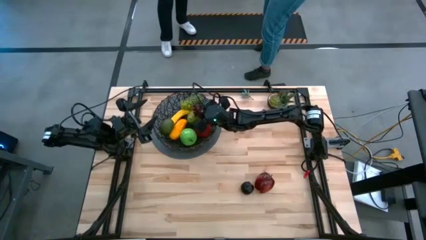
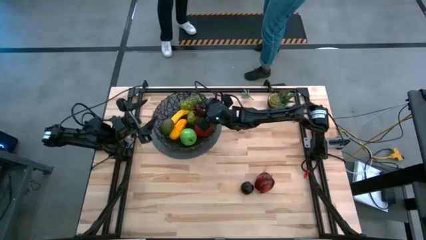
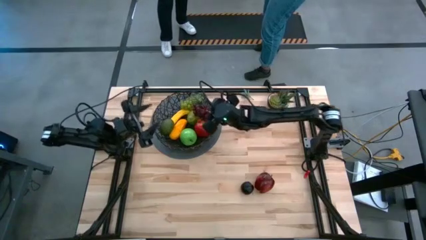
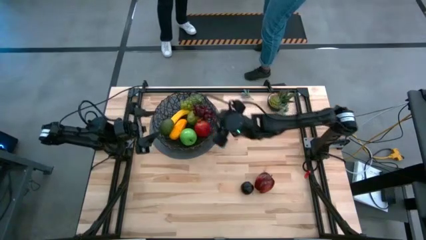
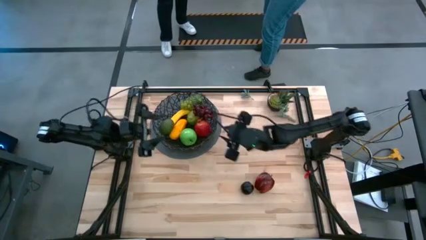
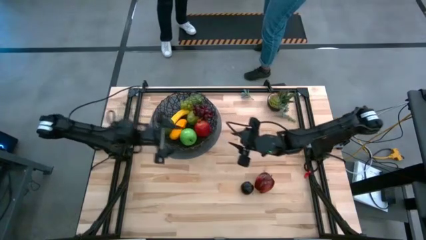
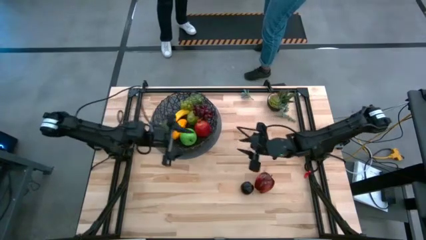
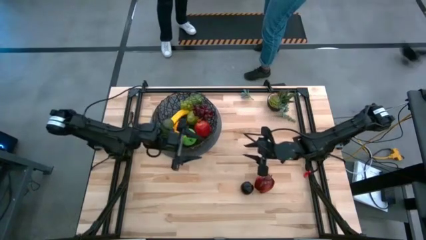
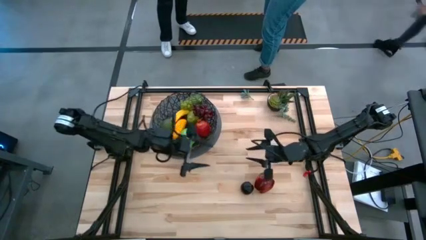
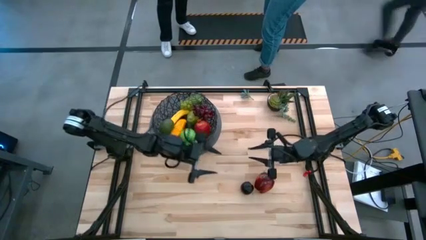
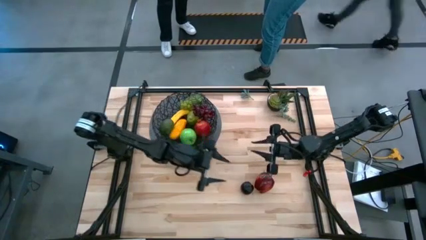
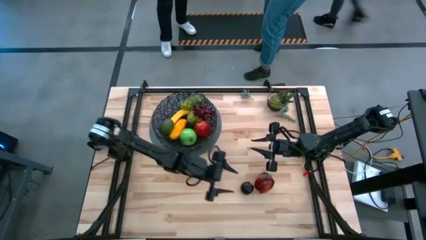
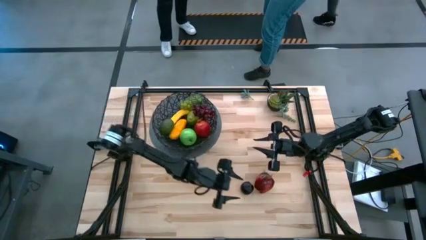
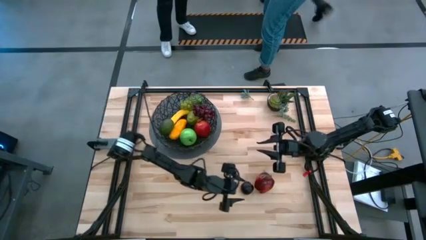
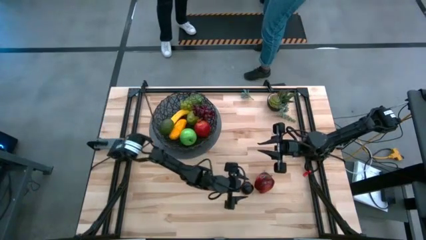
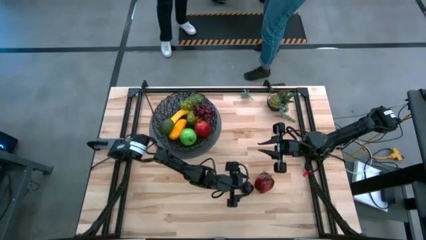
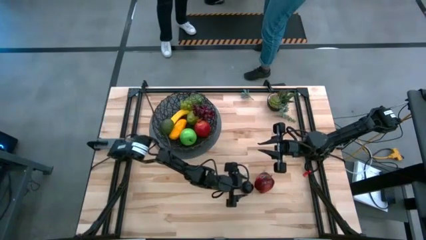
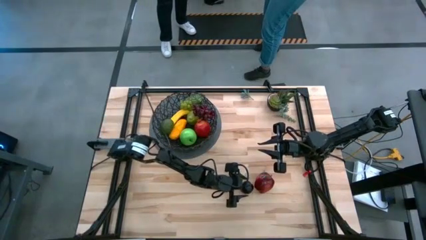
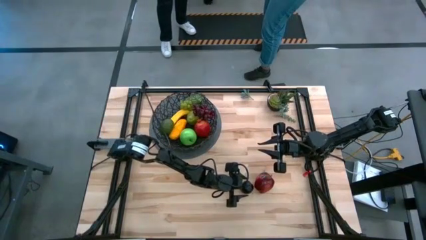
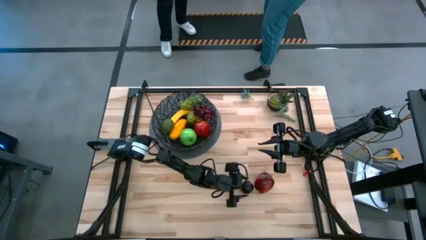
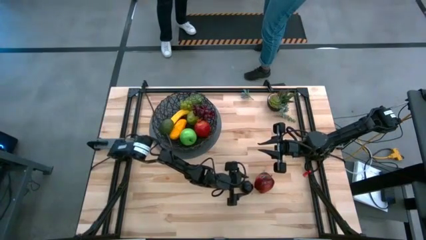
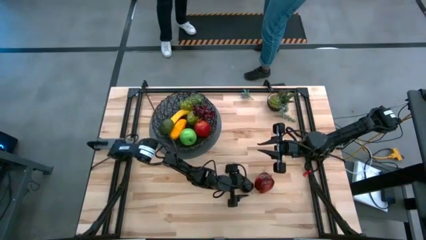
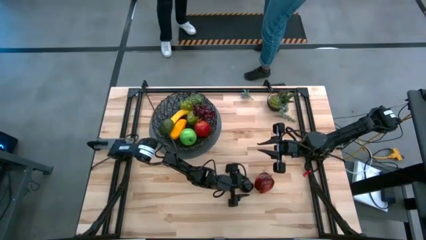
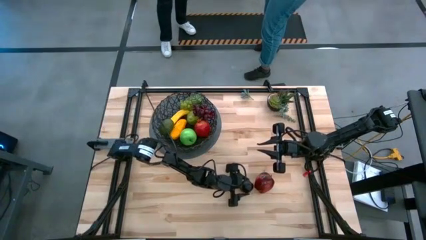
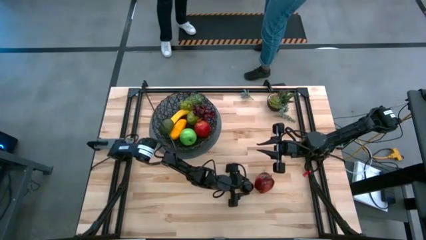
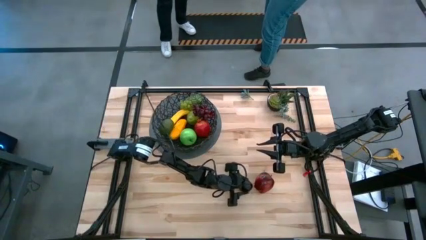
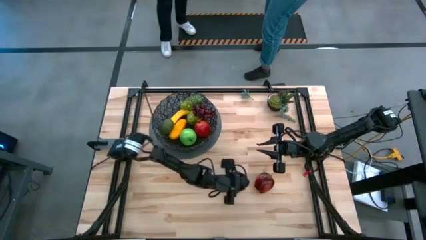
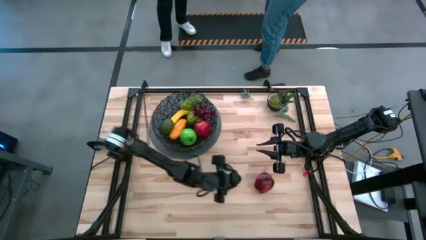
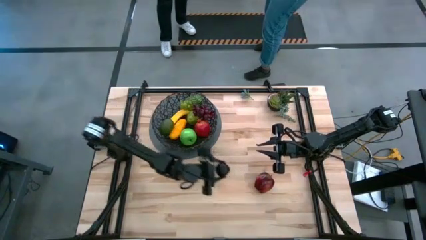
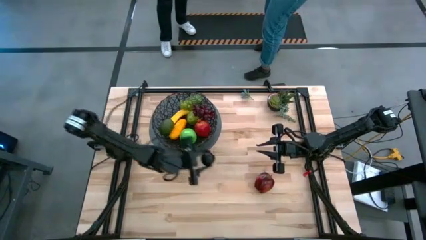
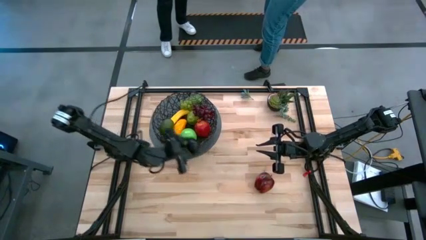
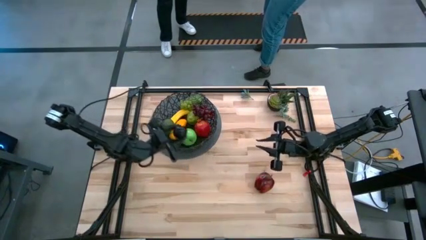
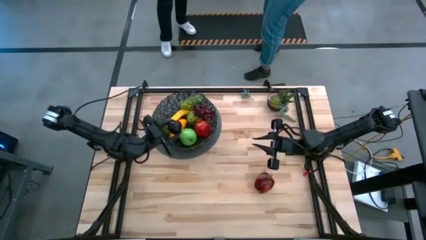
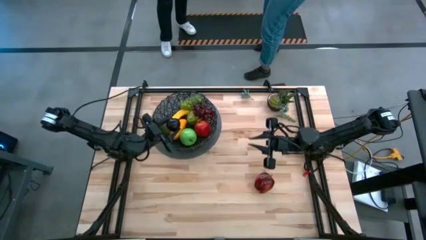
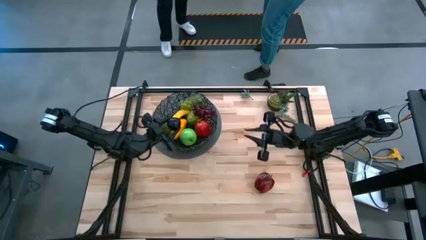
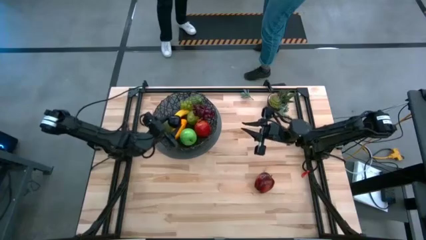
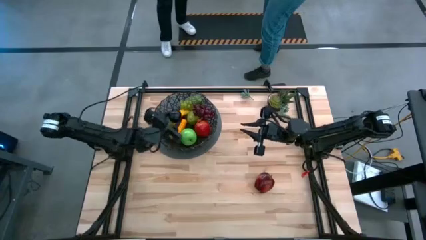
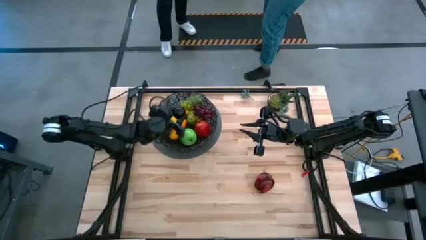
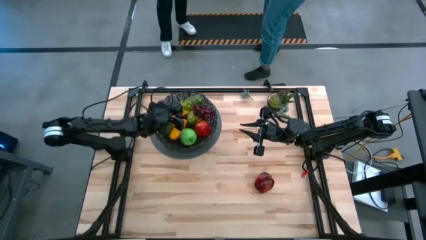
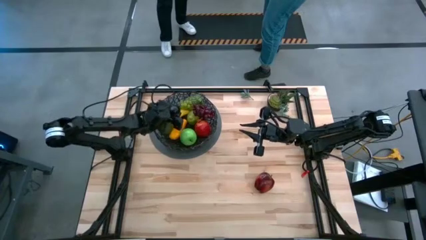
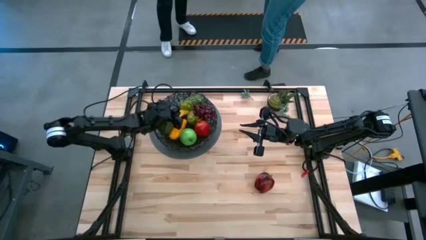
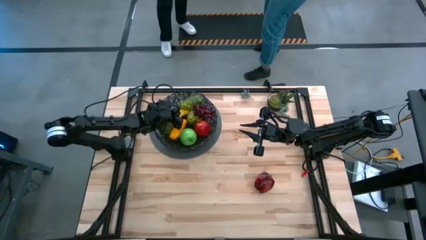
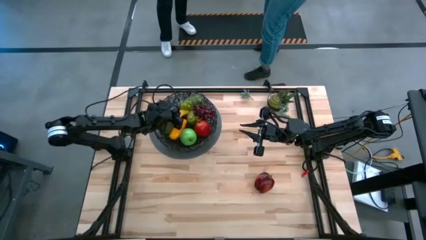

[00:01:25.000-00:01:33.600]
Task: Build produce basket
Put the plum into the basket

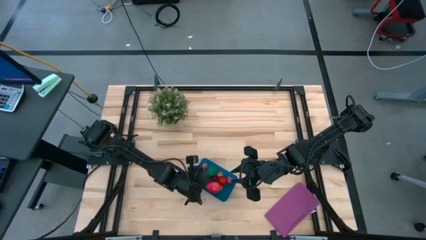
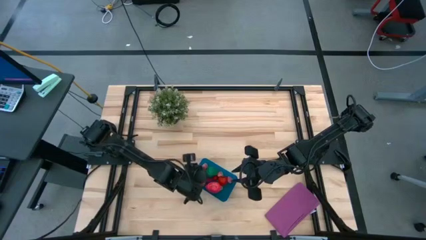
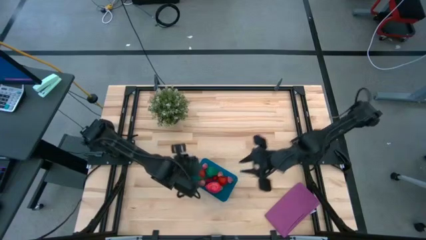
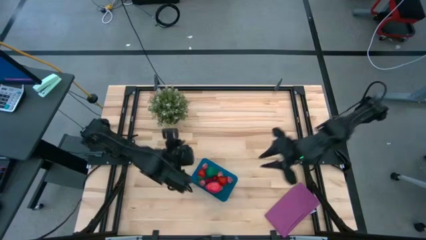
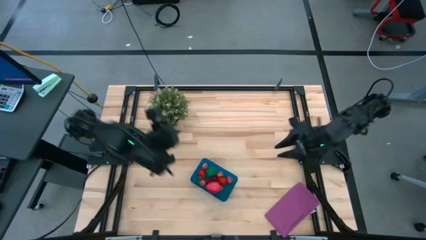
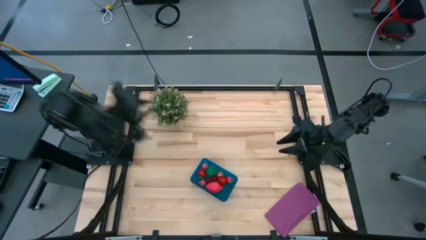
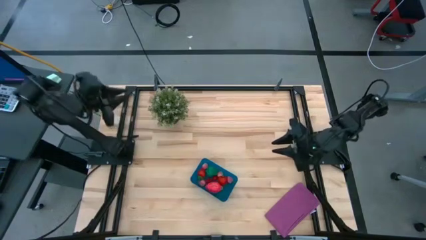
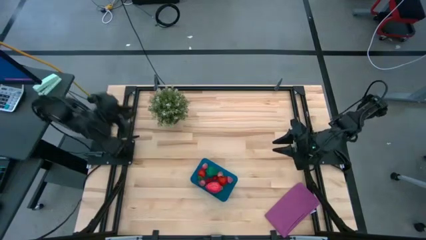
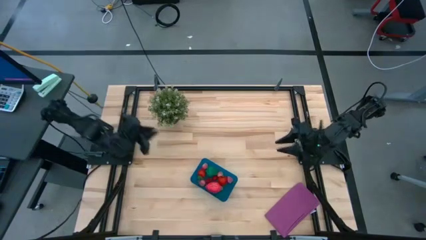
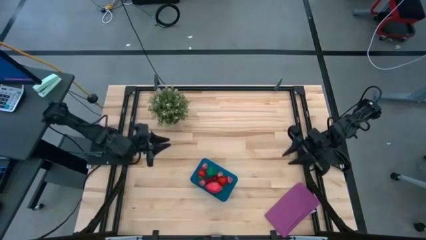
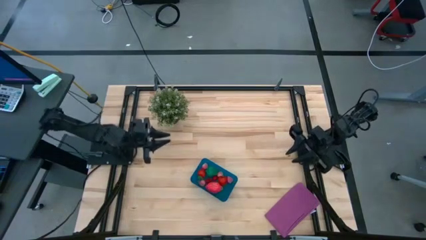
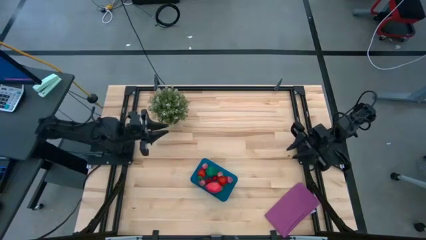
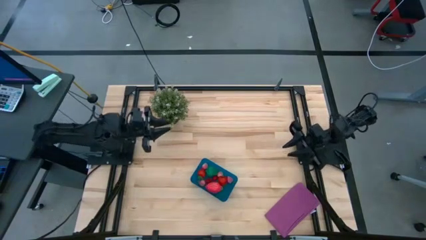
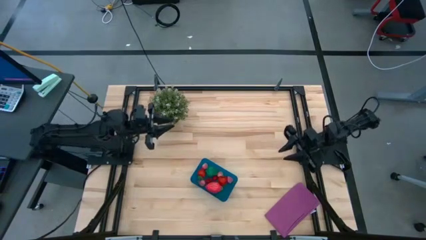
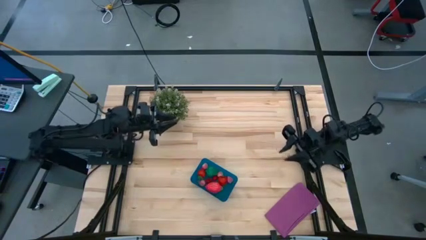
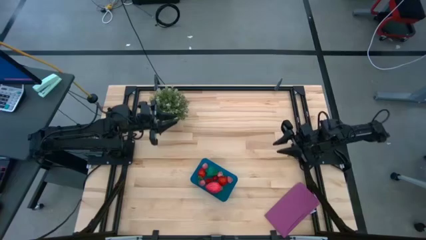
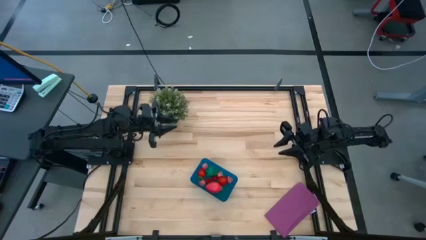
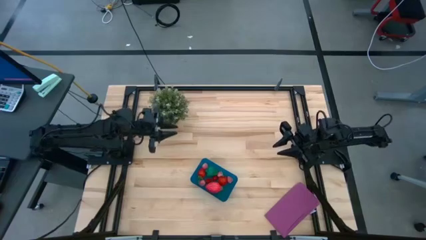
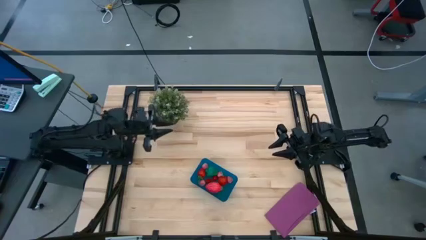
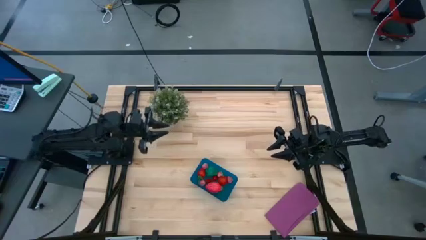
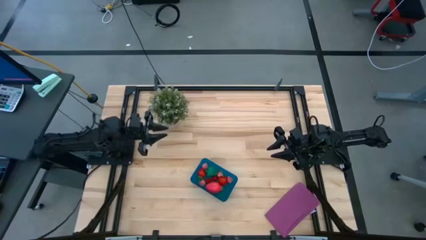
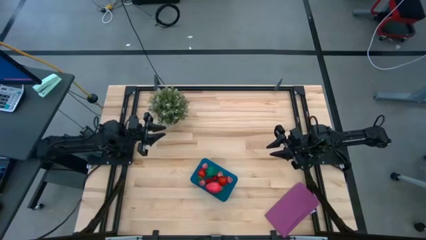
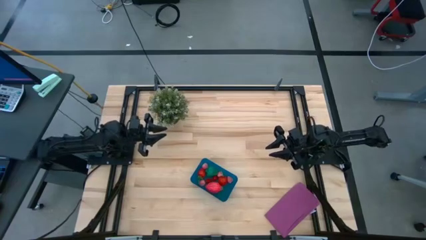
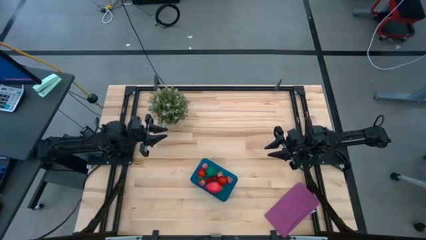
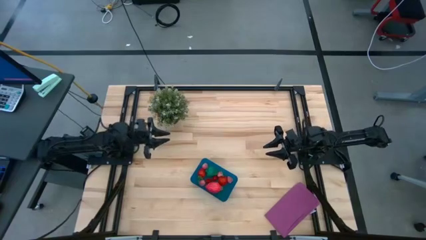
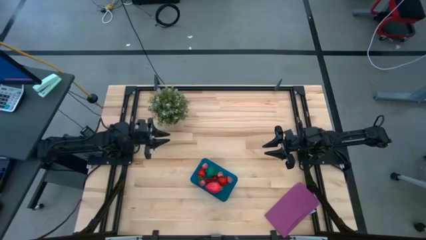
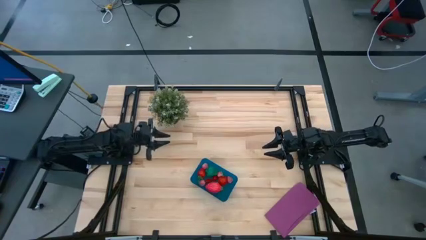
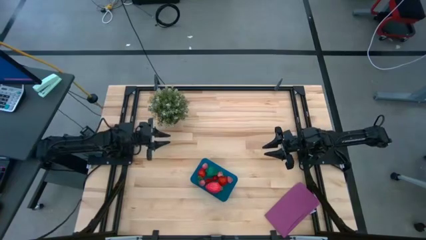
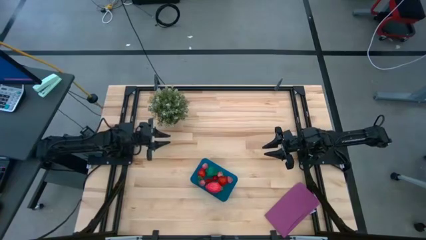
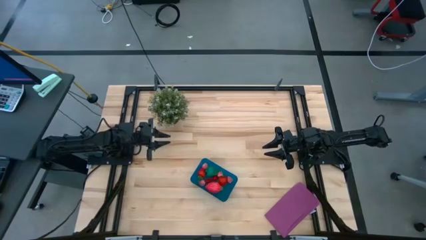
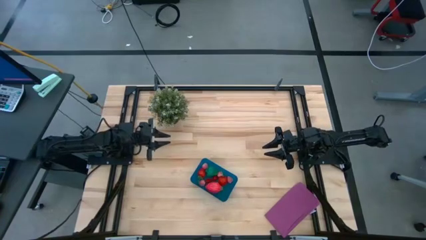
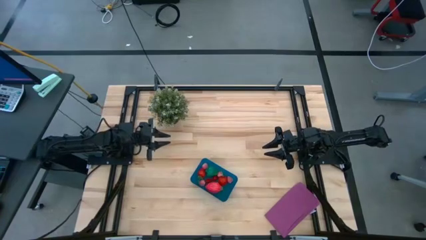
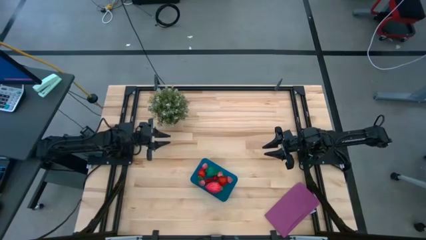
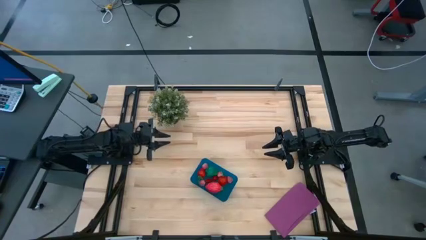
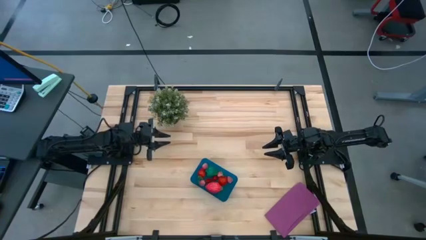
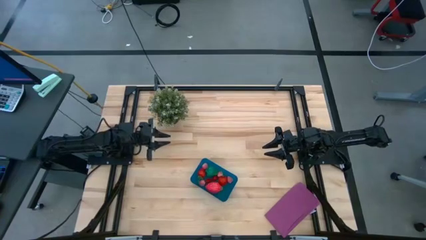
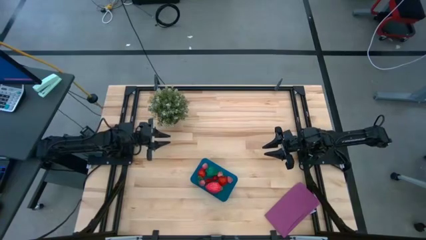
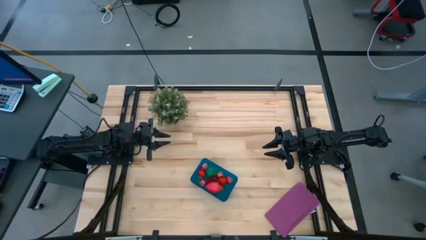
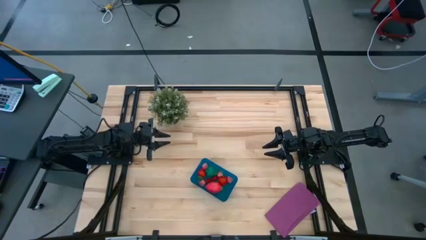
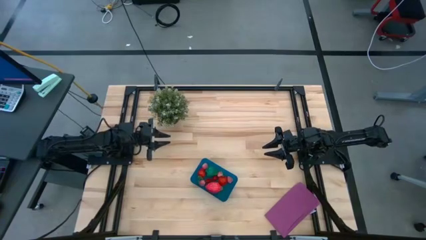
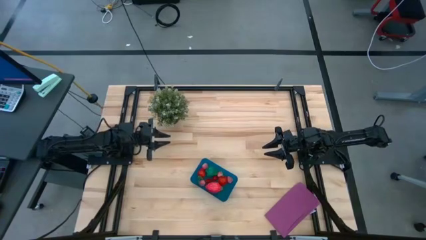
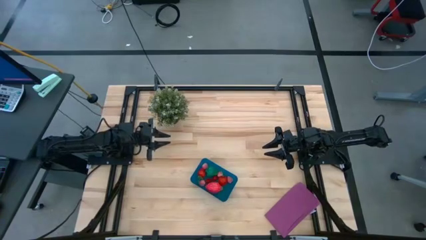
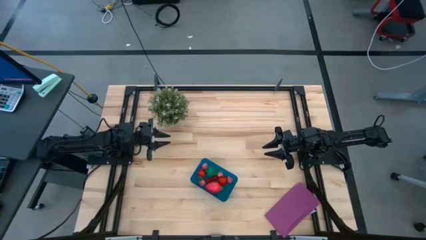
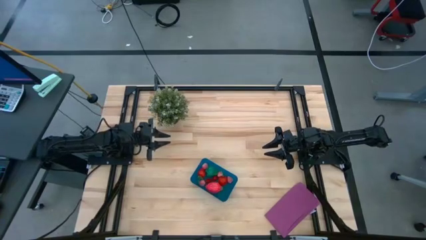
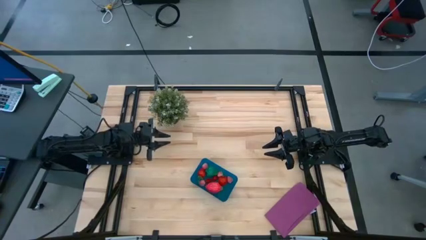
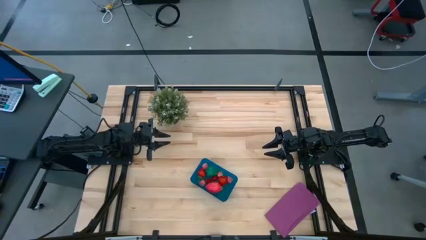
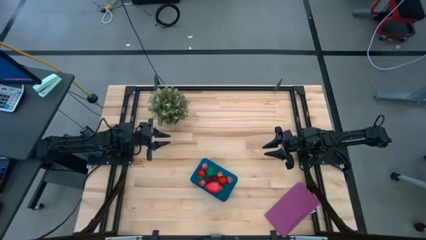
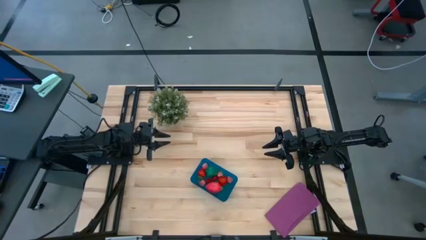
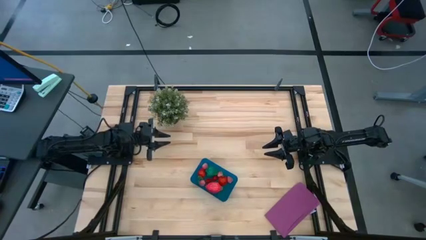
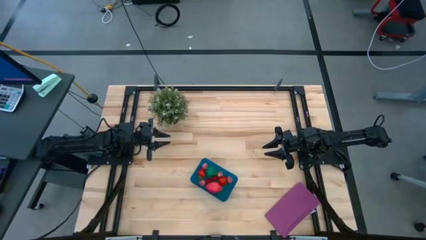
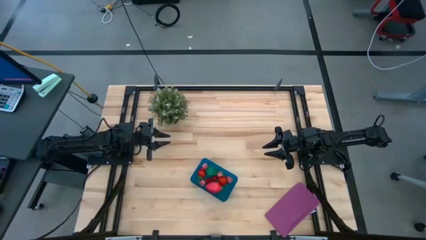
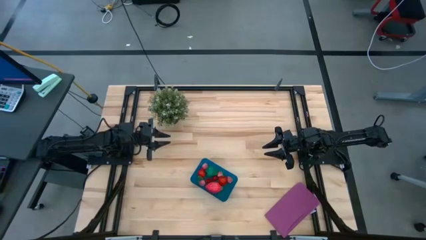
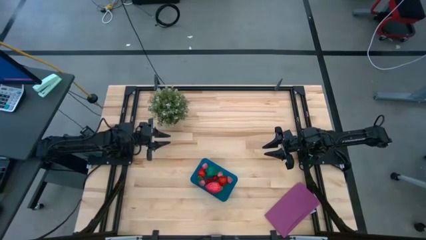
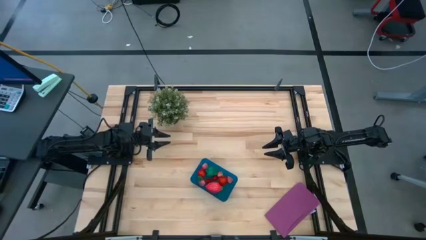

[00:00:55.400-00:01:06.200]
Task: Pick and placing Produce into tupperware
Return to Home Position
